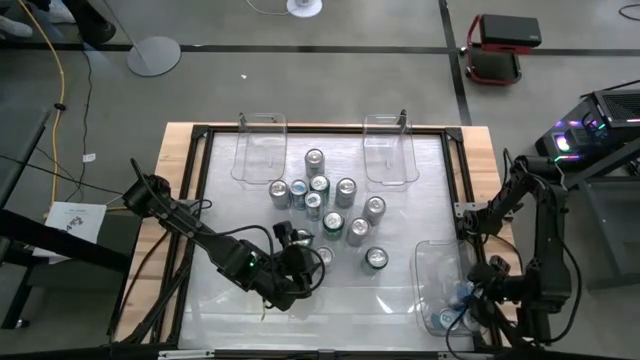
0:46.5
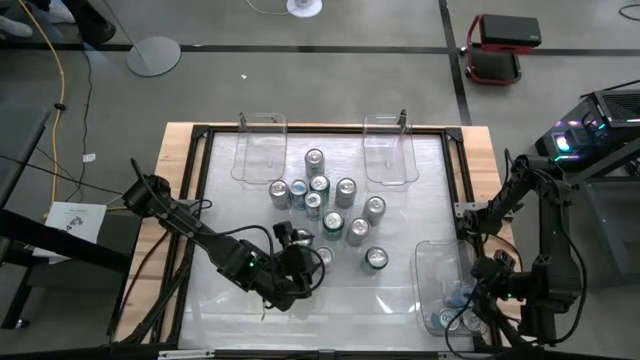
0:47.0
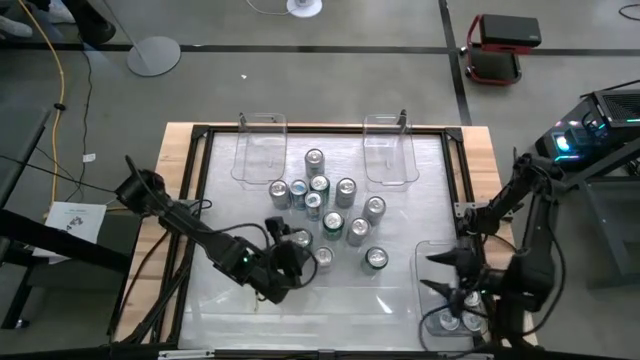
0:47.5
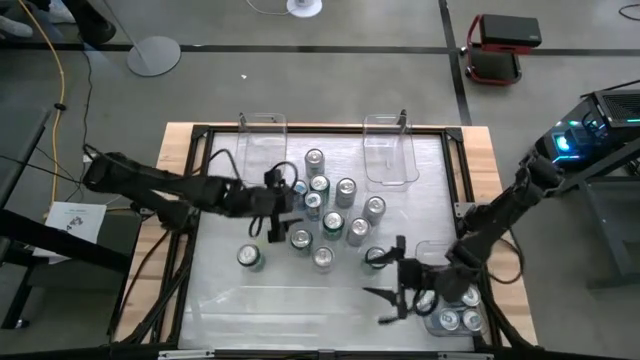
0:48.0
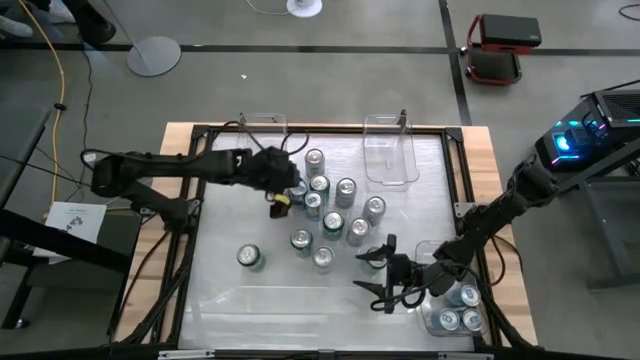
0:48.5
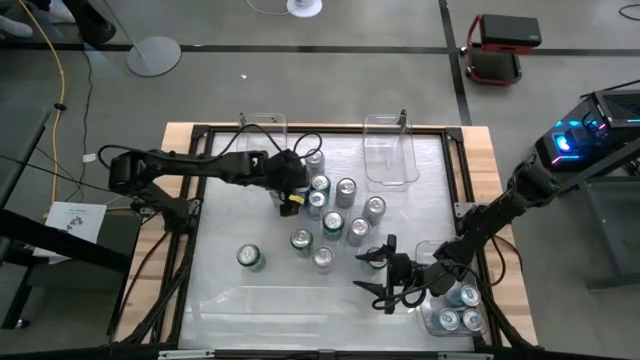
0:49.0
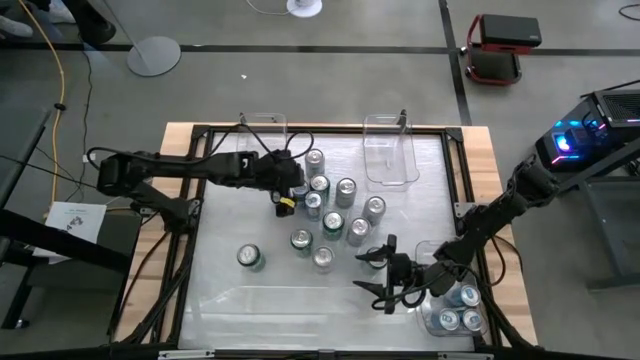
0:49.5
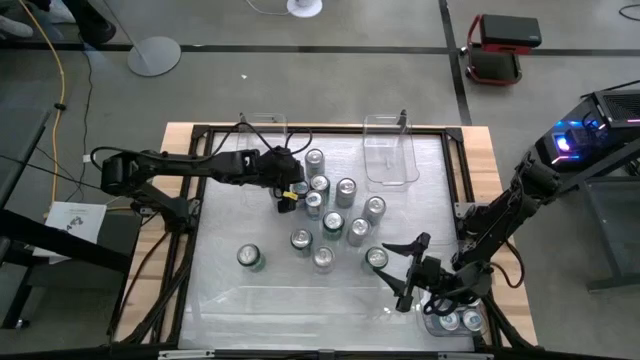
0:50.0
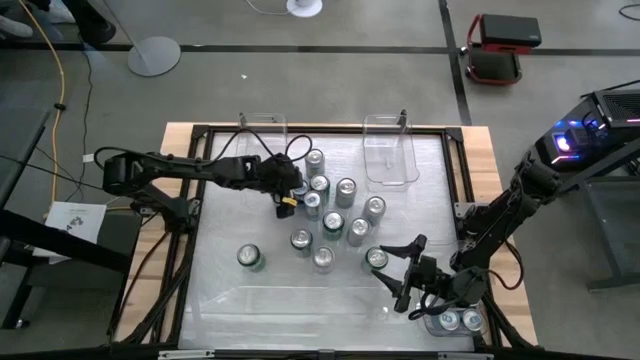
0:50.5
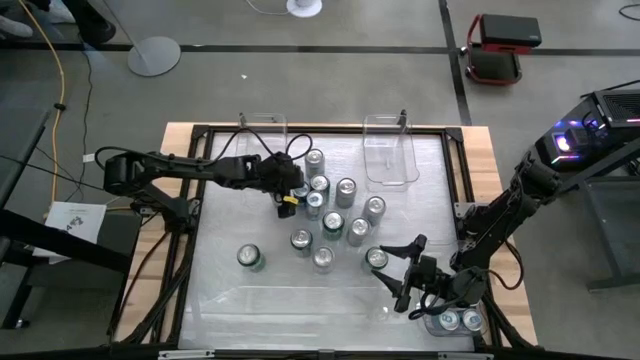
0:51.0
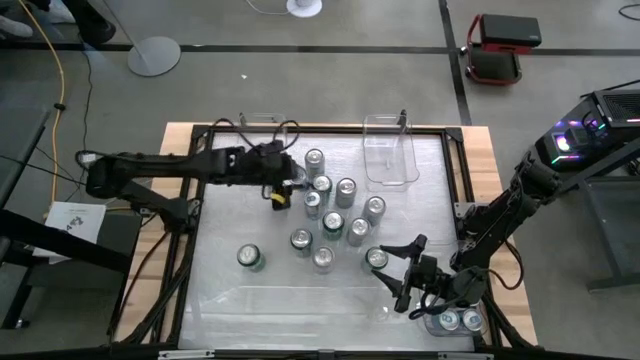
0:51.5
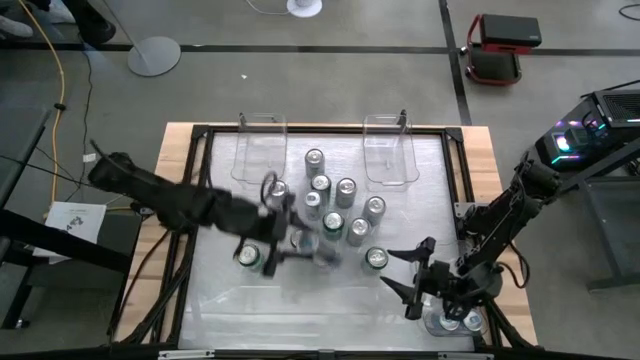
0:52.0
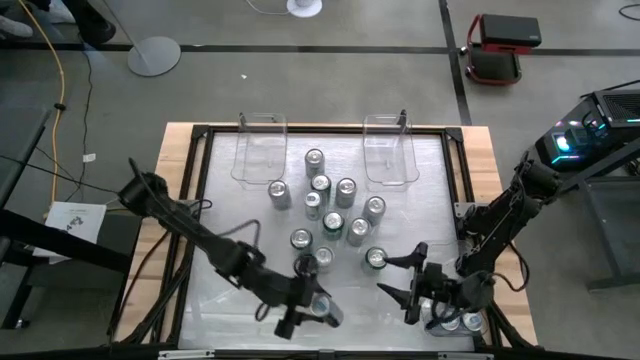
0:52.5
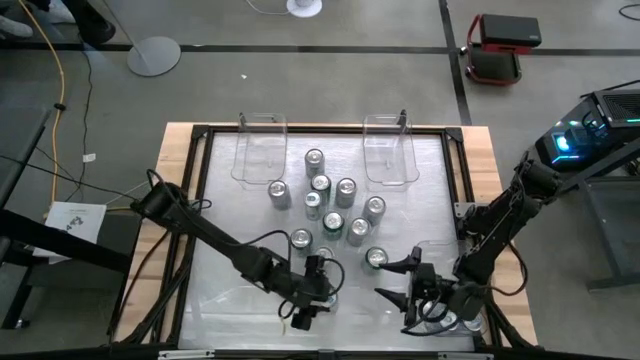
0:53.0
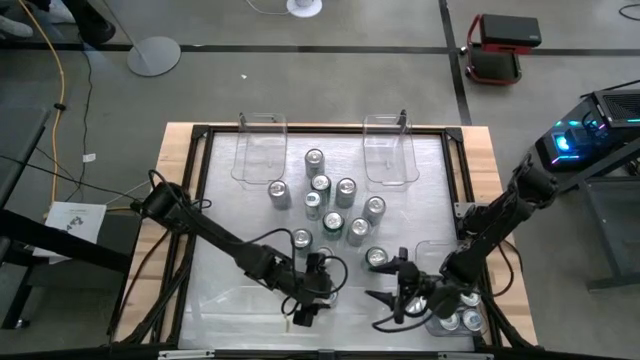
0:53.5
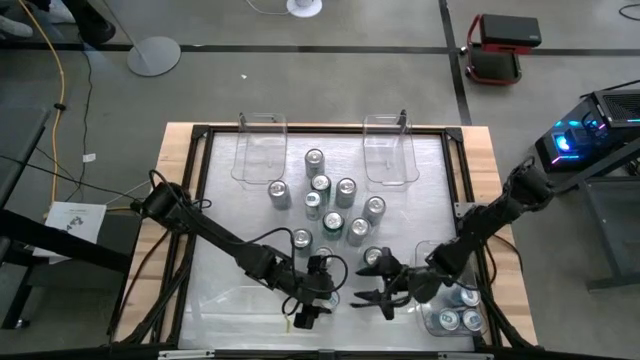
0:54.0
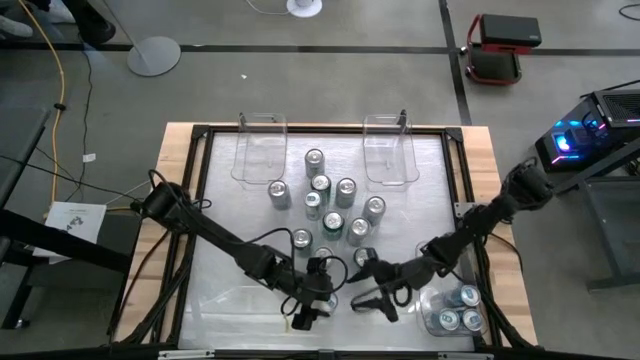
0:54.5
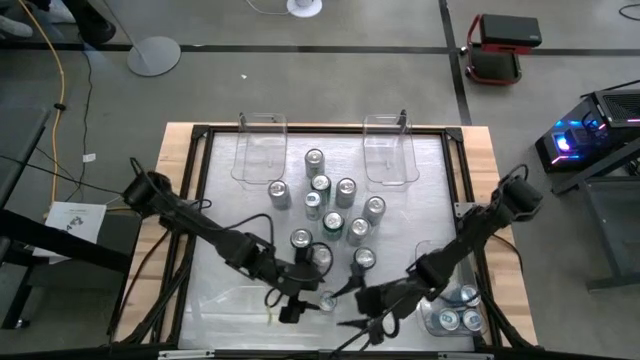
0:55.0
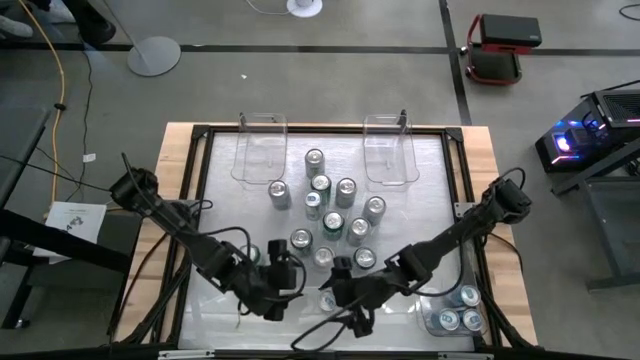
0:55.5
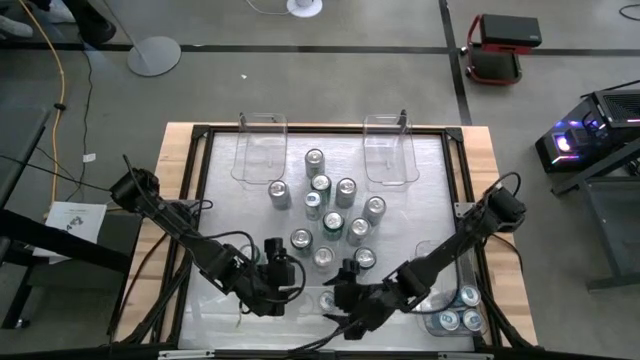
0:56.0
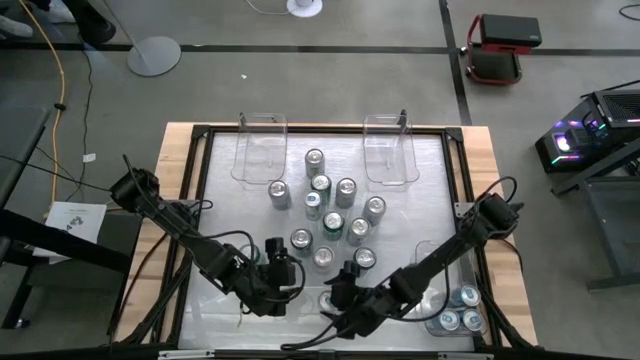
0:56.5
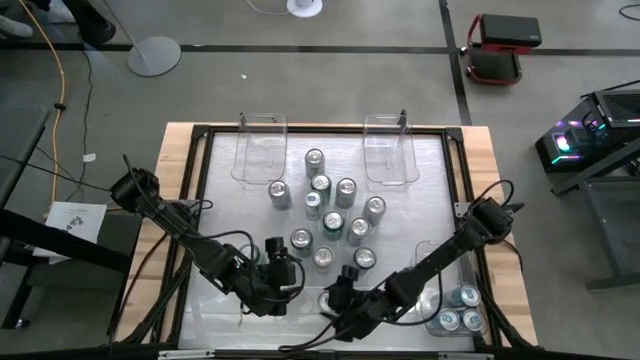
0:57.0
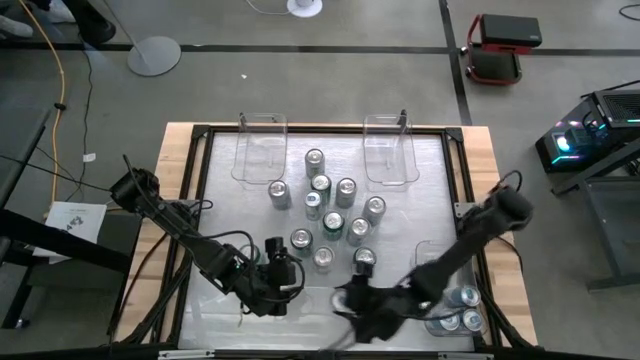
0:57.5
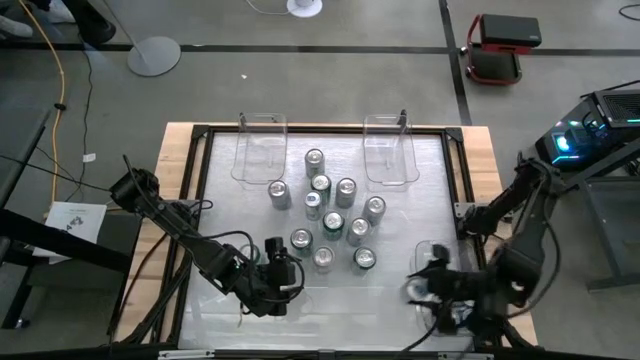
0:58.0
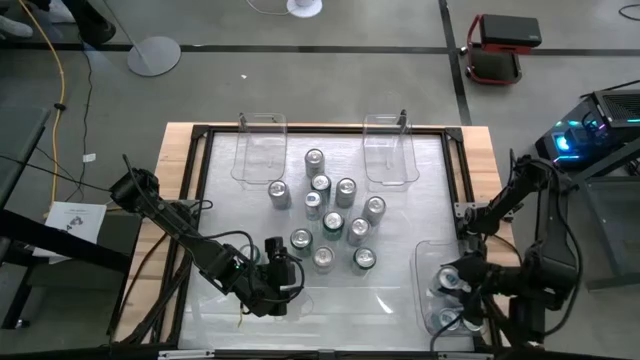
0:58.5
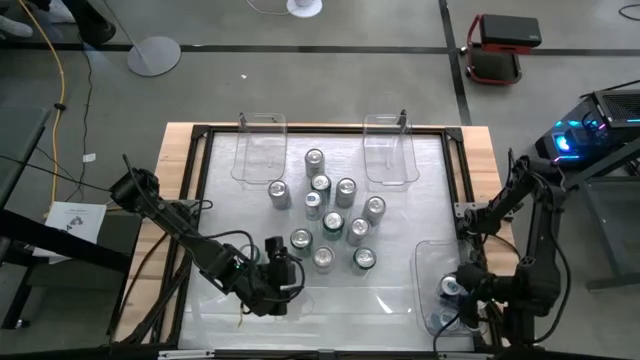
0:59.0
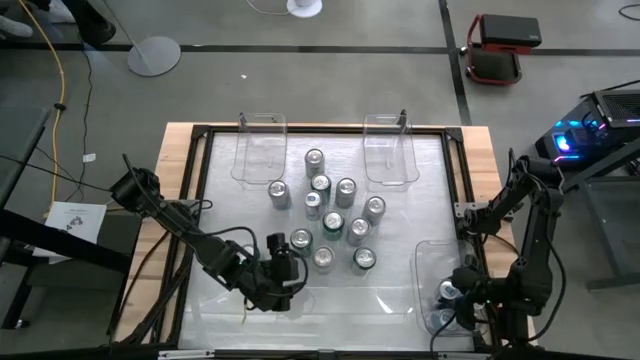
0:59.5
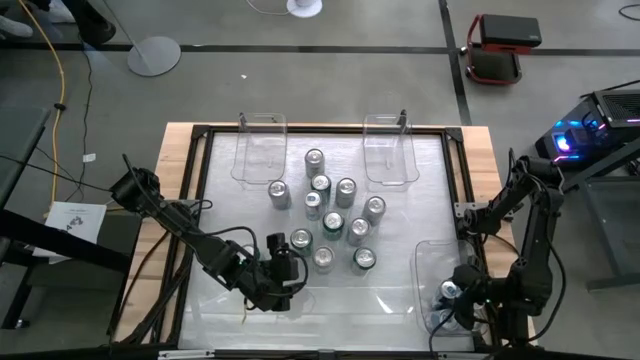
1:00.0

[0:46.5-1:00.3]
Task: Sort soda cans
Put the blue soda can into the bottom right transparent bin

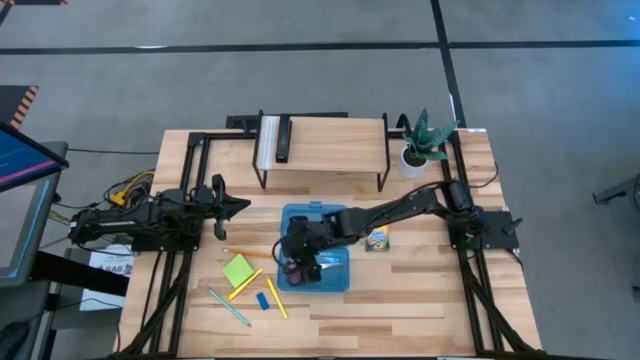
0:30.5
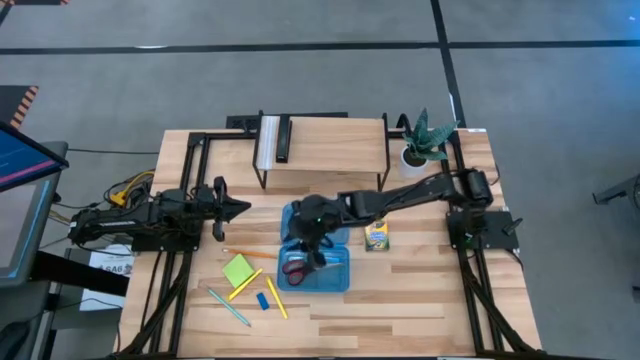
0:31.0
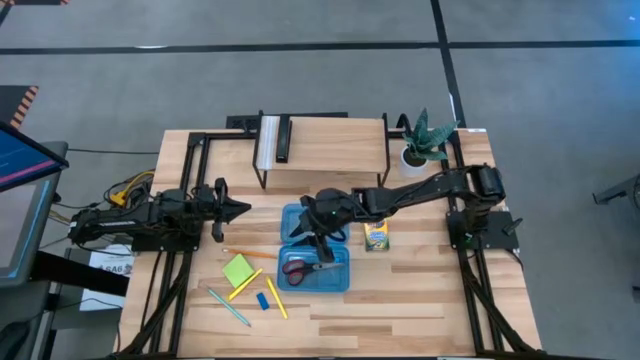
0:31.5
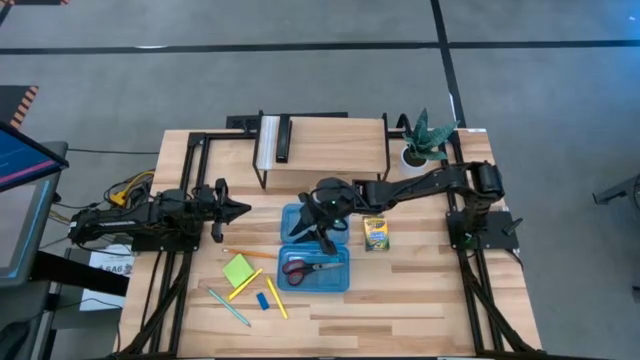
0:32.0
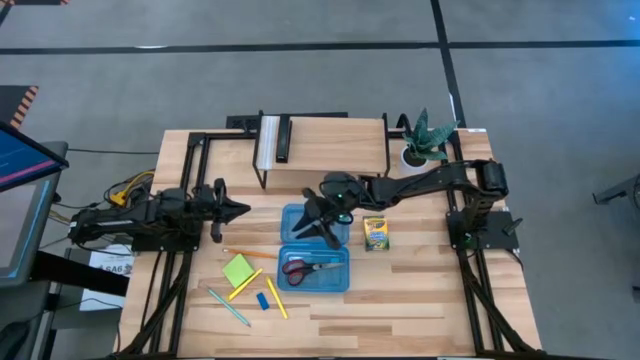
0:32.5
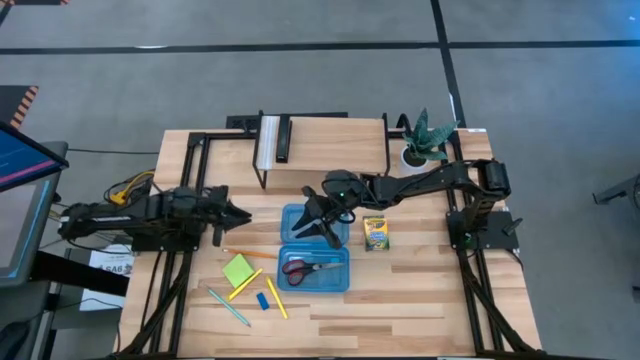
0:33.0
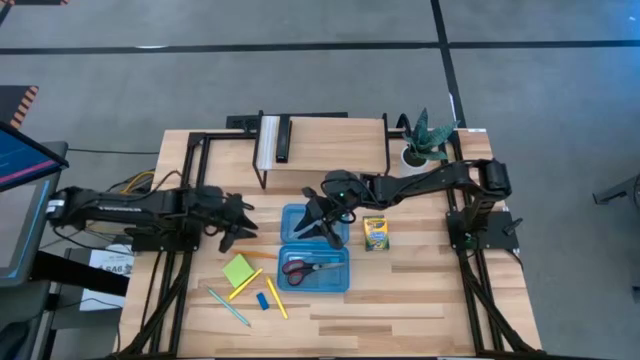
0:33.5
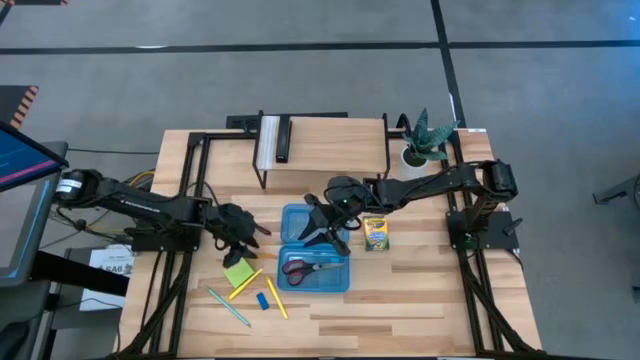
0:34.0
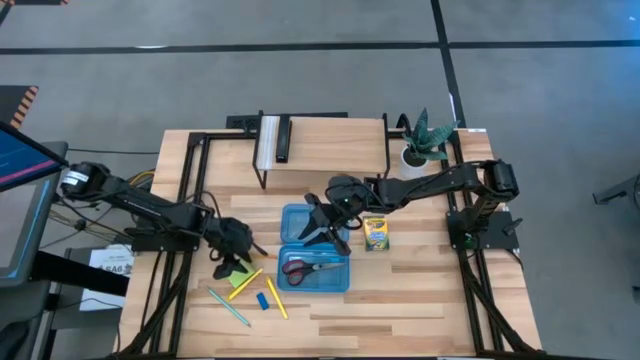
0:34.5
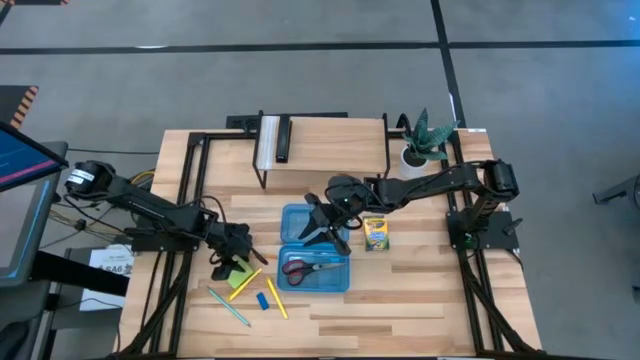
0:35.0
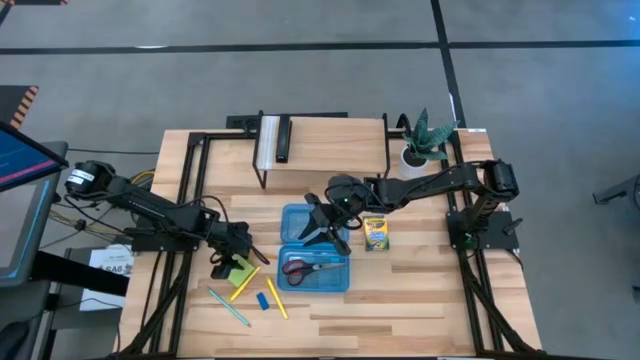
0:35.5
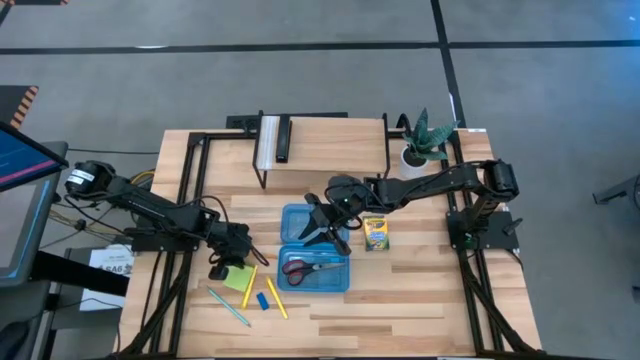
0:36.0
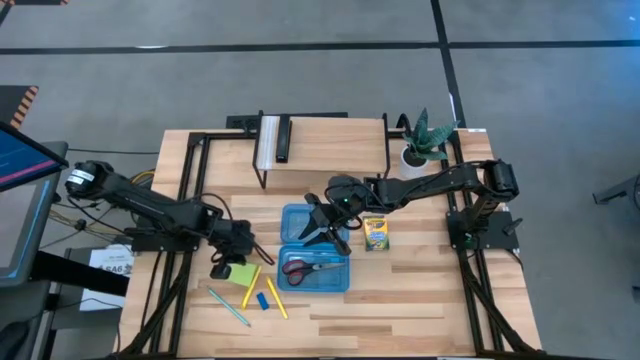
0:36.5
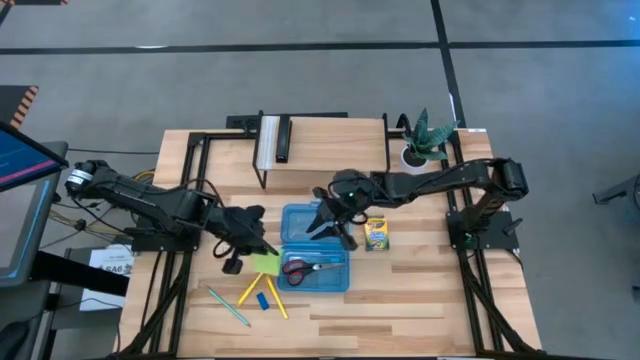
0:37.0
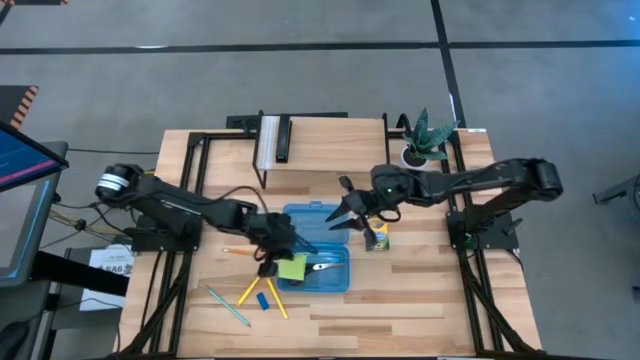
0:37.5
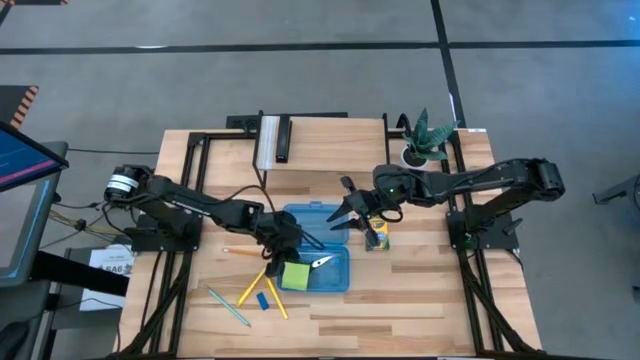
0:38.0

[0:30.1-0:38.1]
Task: Pack school essentials
Put the green sticky notes into the blue supply box
